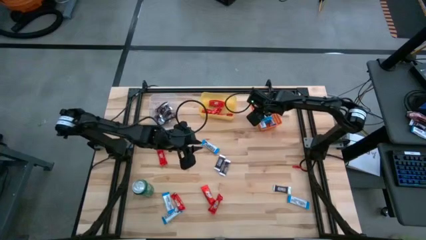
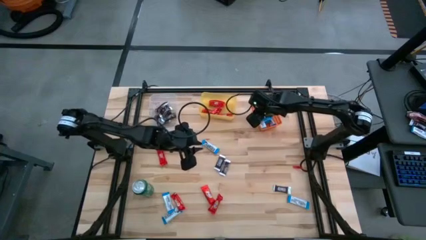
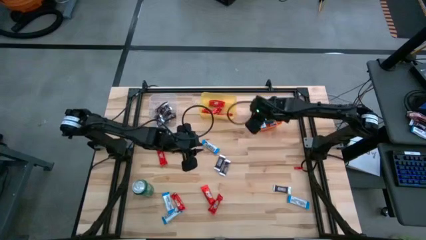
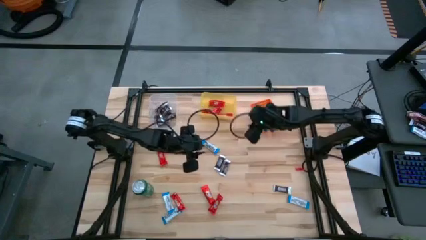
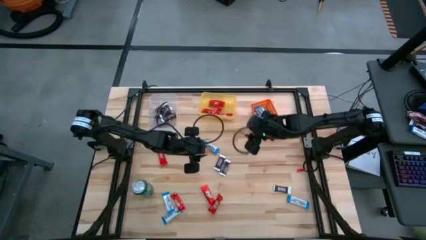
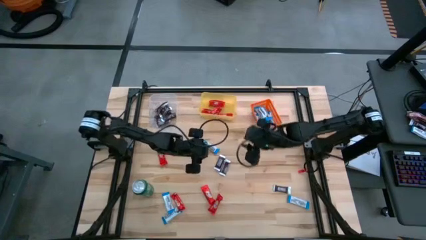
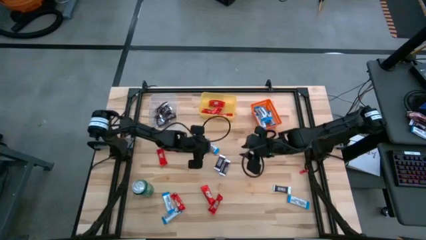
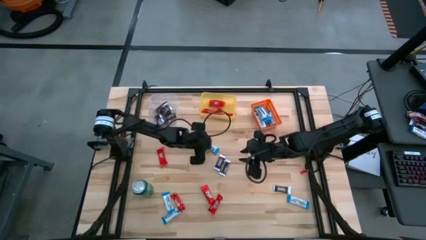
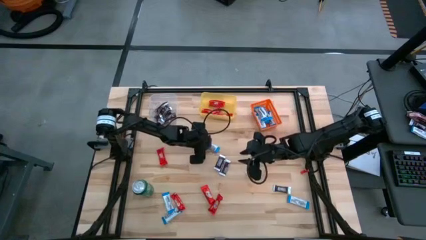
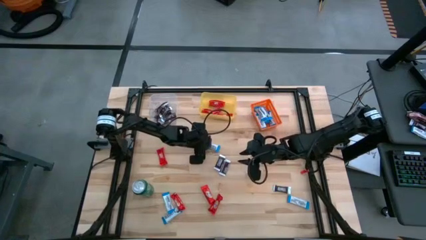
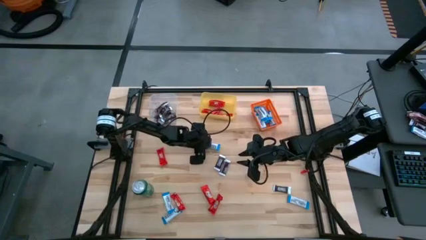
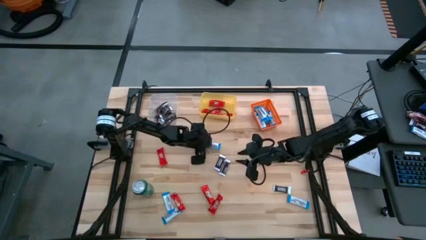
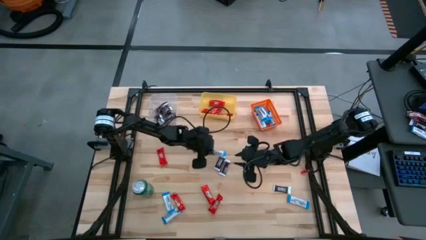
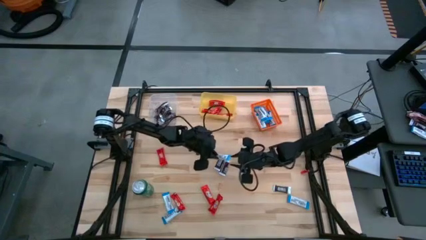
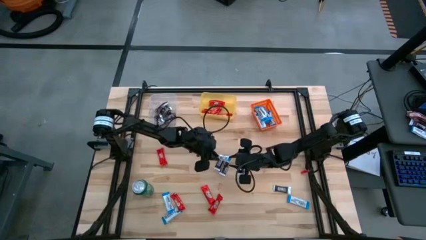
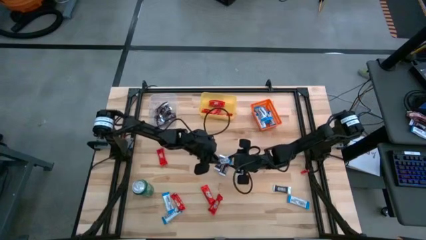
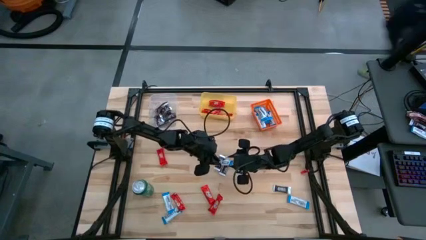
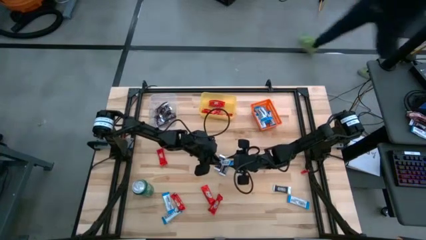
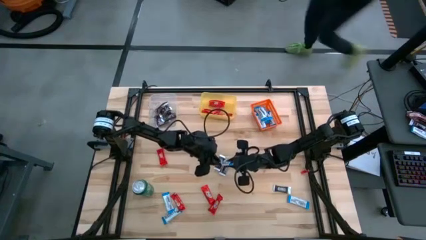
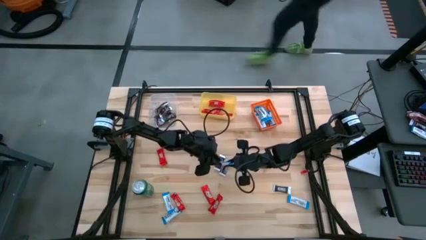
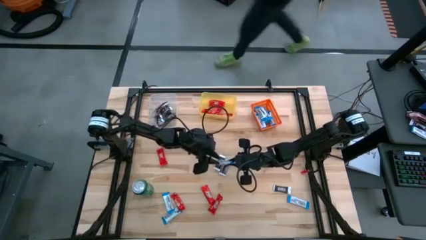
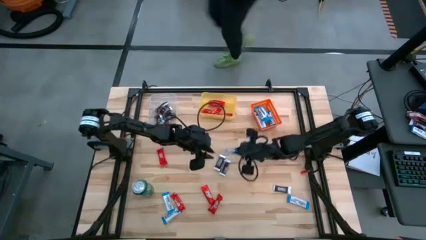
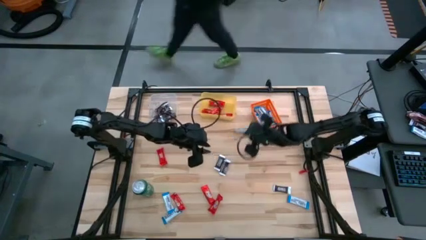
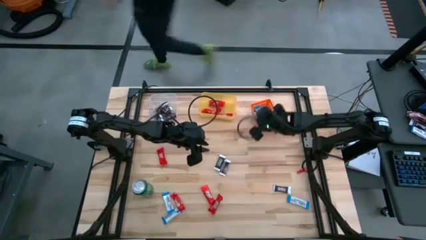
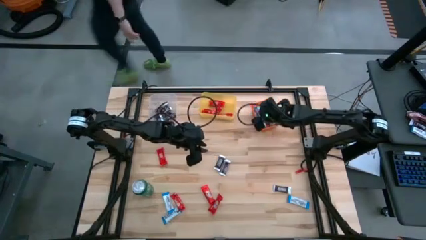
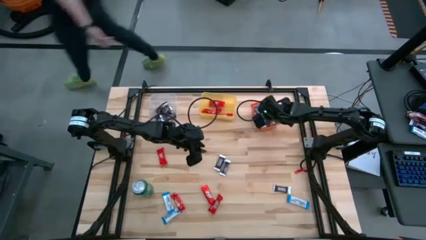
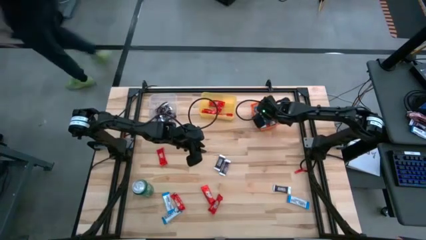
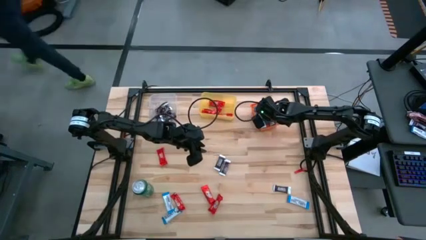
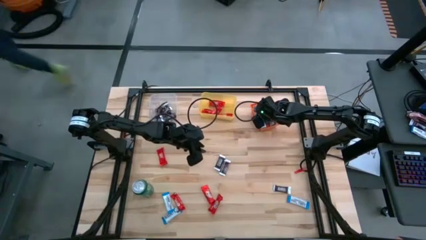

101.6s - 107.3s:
Task: Sort candy
Put the white chocolate bar into the orange bin

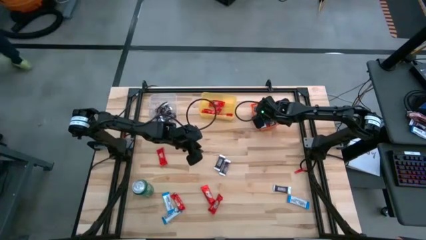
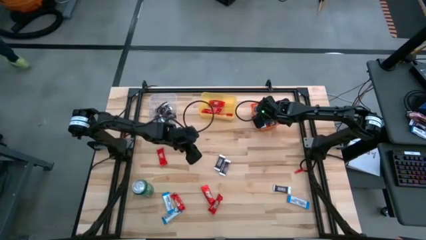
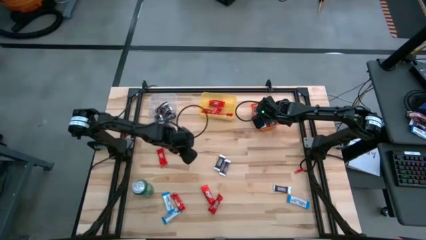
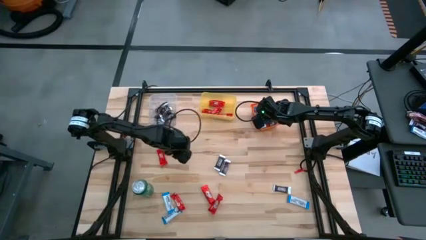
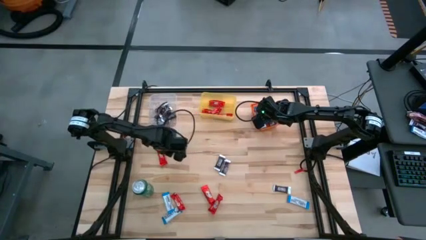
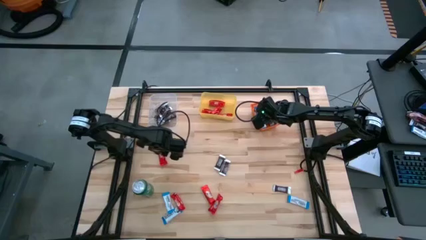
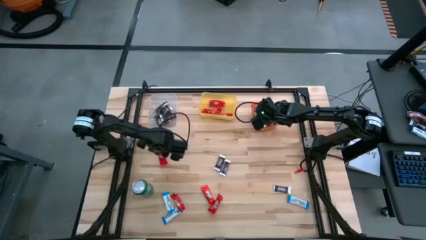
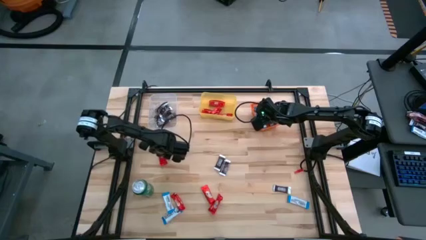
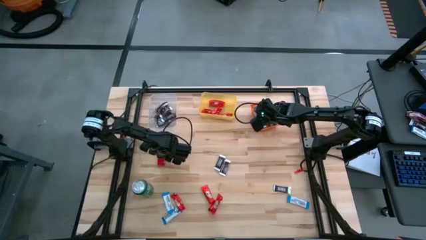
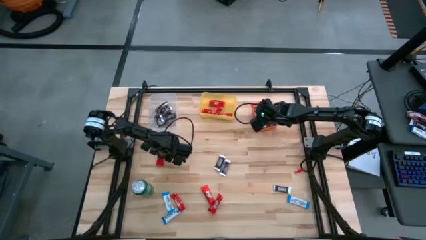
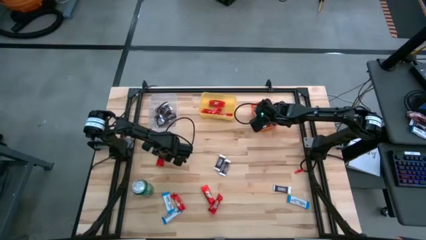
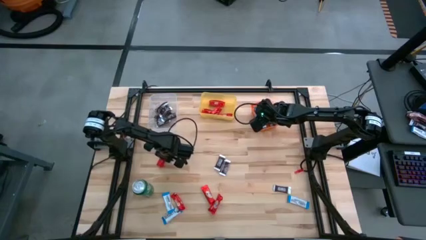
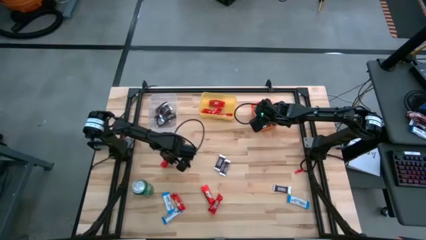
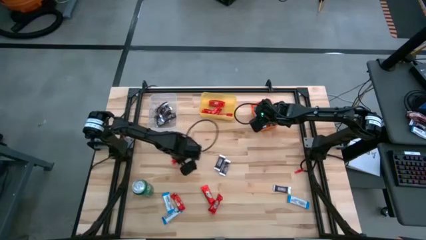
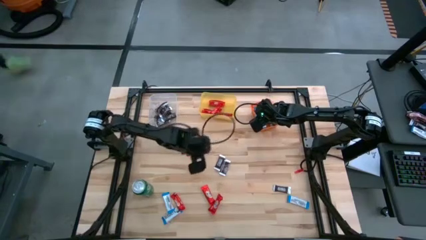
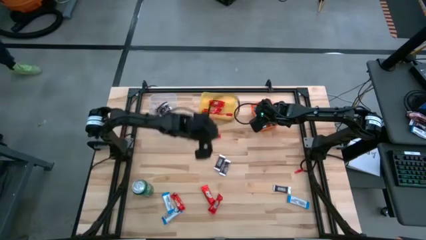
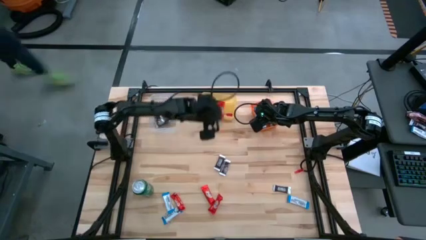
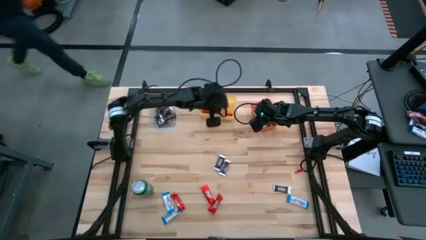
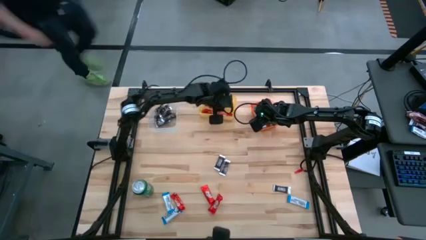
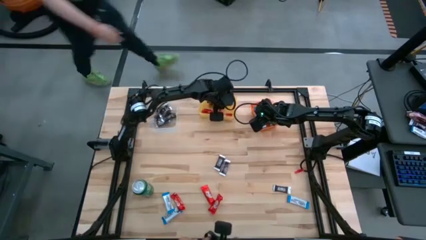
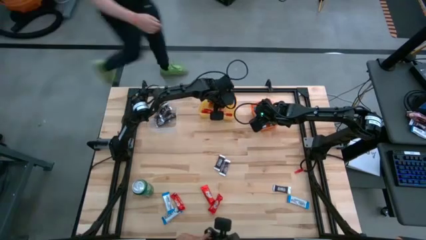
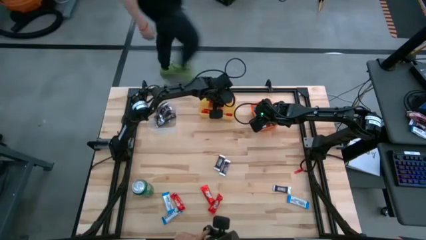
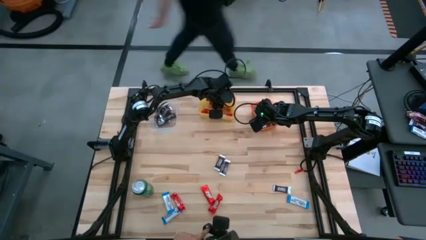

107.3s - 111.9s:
Put the red chocolate bar into the yellow bin

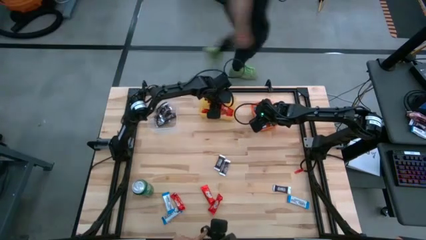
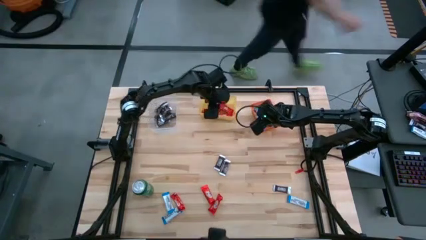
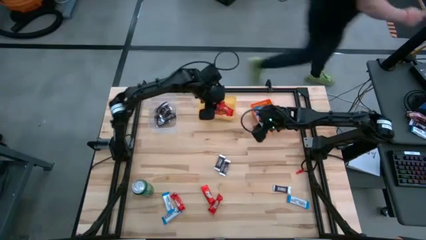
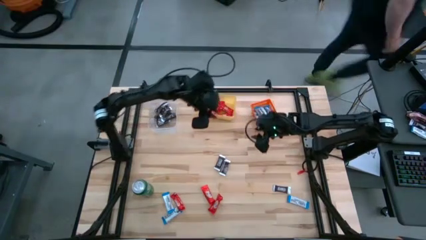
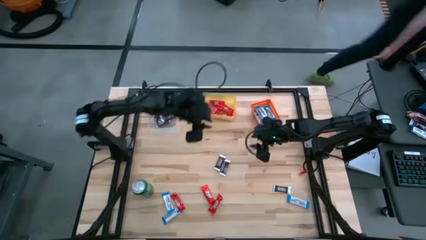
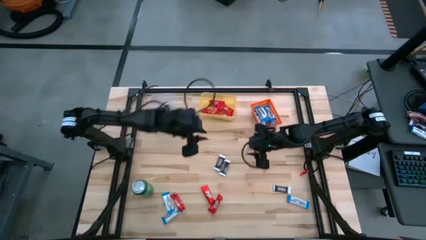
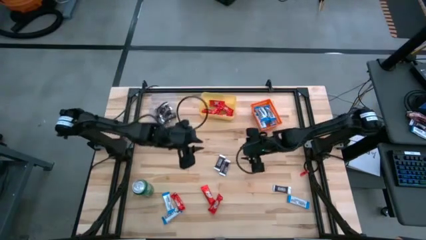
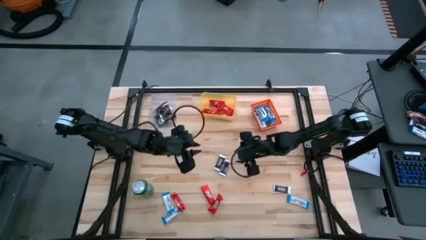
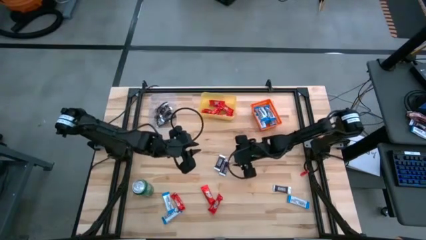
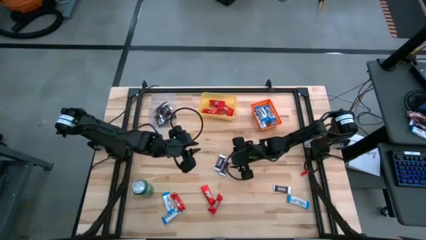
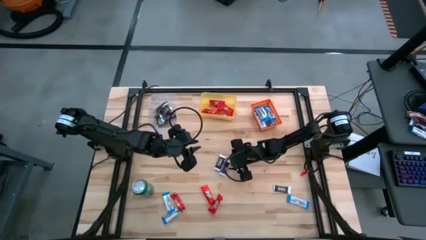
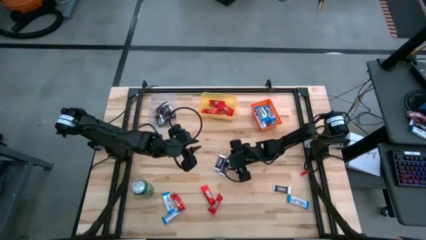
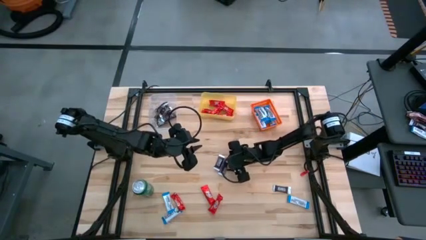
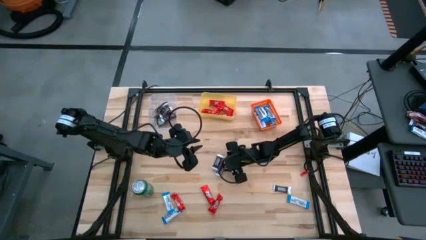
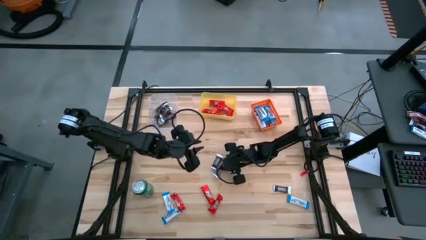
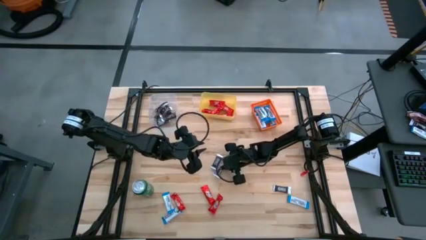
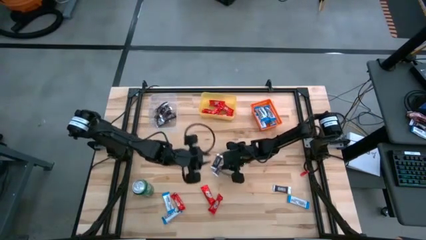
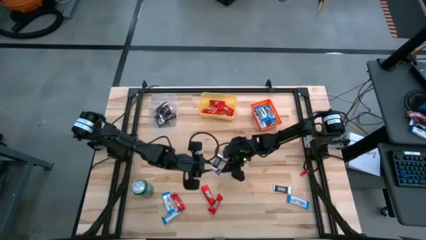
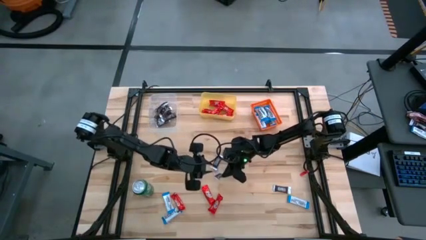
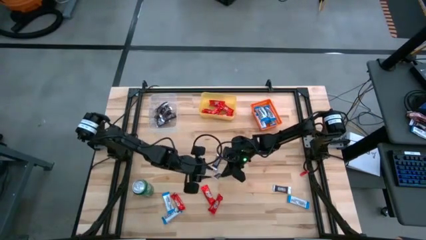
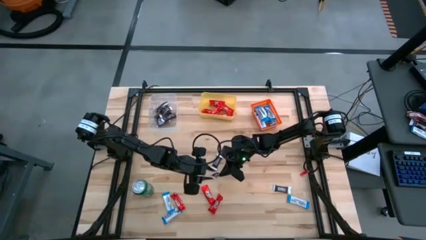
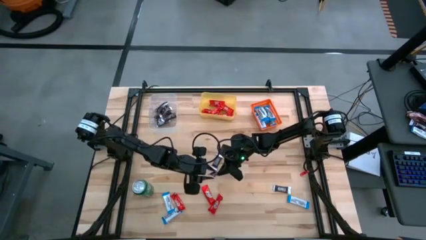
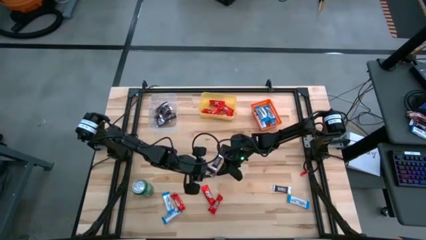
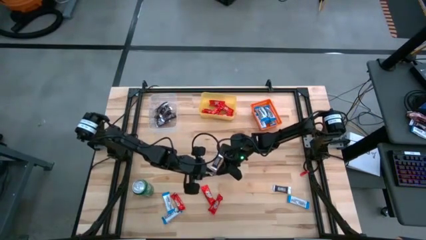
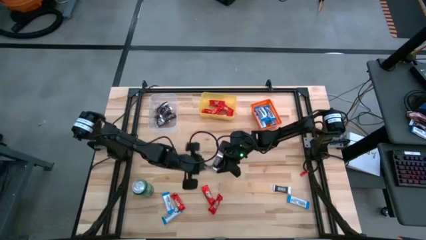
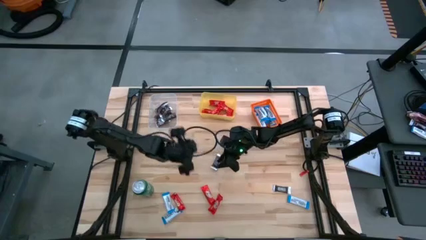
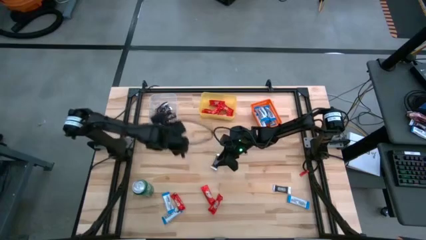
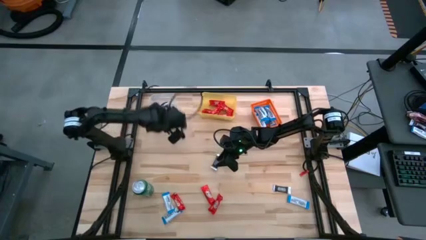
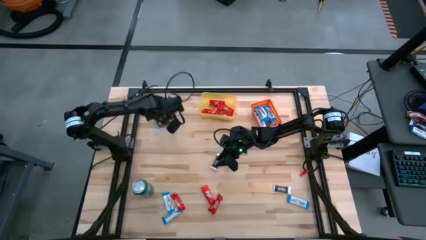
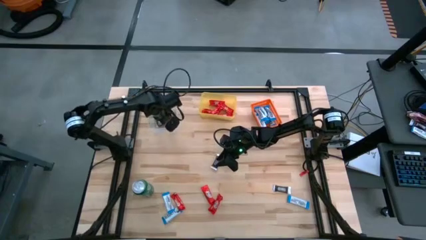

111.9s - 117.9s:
Put the brown chocolate bar into the transparent bin
